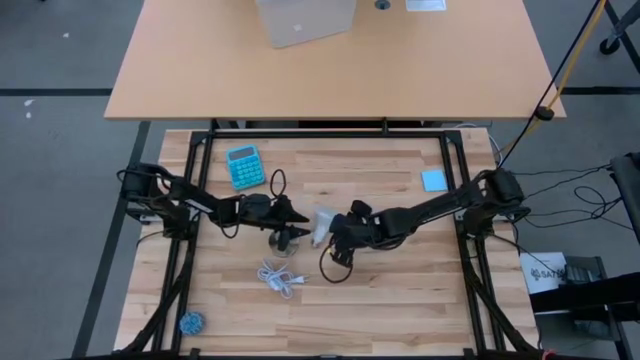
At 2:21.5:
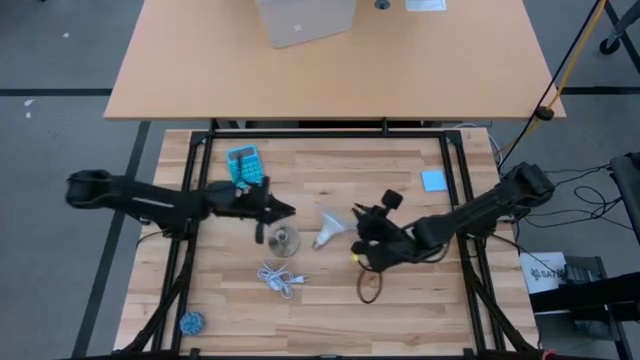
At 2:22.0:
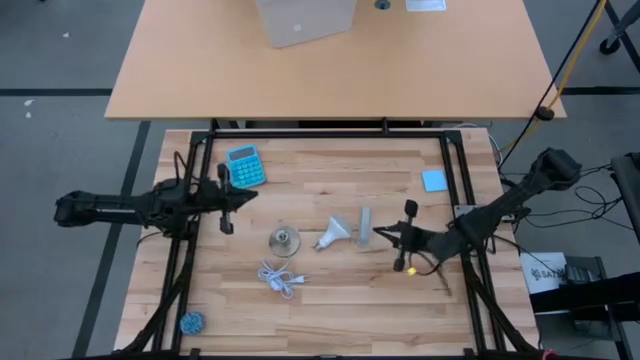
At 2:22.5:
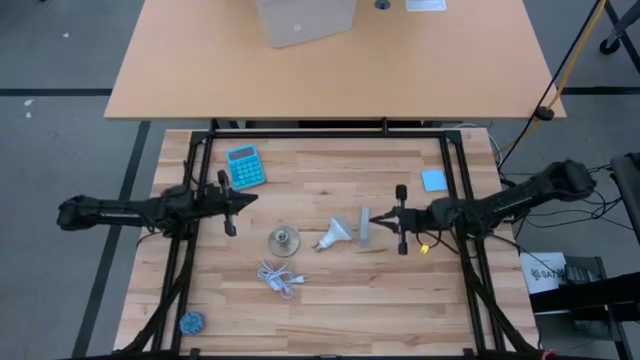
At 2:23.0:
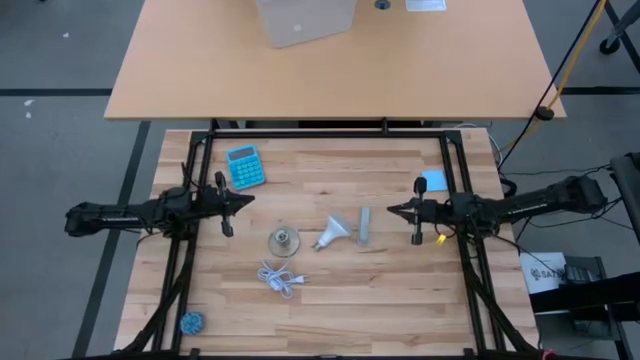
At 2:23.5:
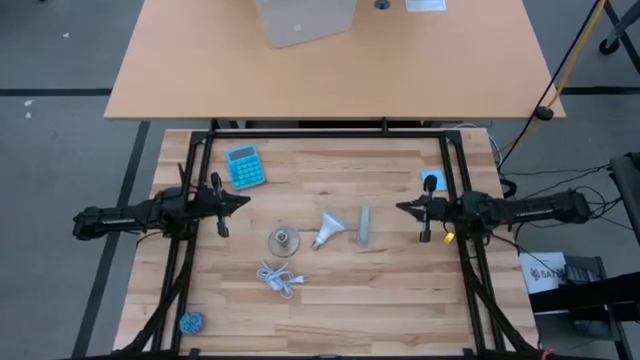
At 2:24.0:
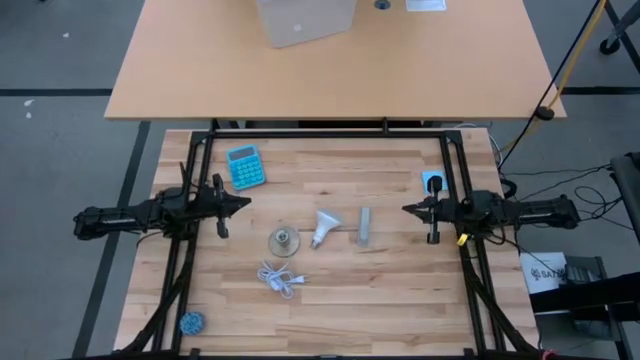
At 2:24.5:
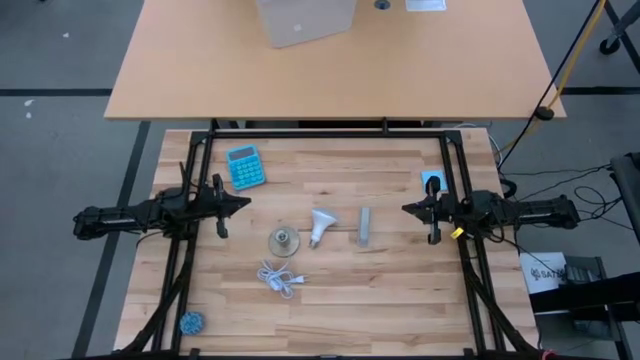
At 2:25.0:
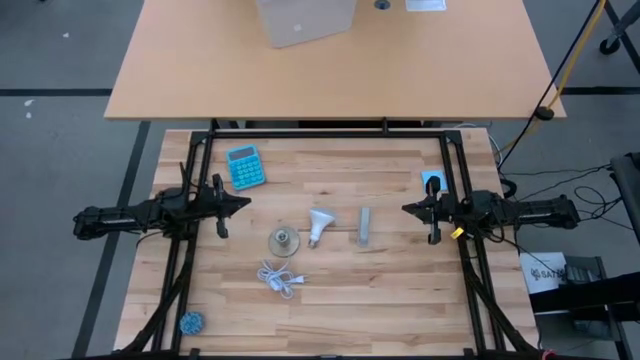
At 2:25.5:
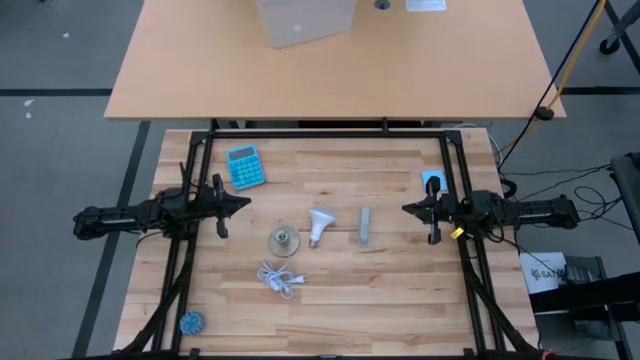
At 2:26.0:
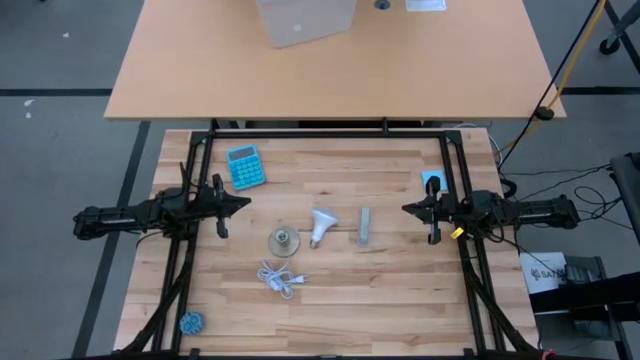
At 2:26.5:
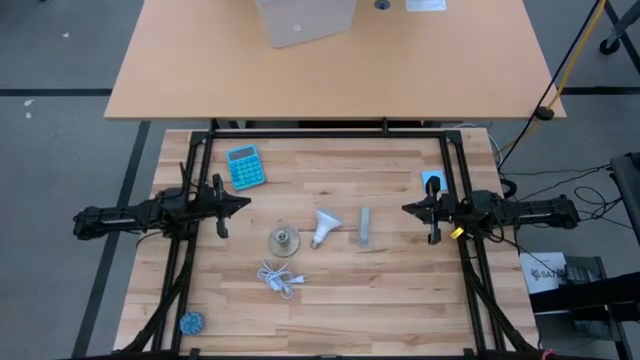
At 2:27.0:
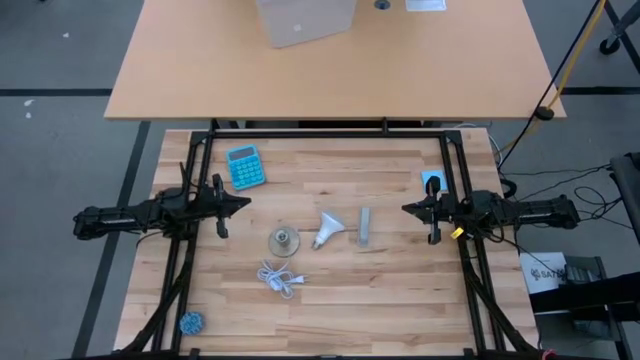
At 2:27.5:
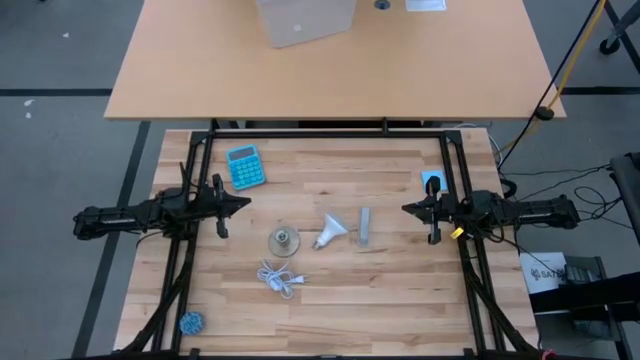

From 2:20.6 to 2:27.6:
Task: Screw lightbulb
Return to Home Position

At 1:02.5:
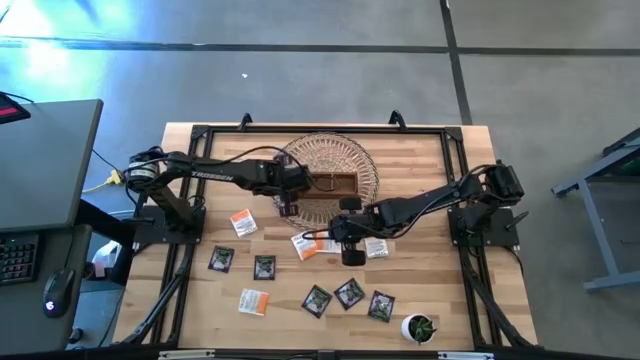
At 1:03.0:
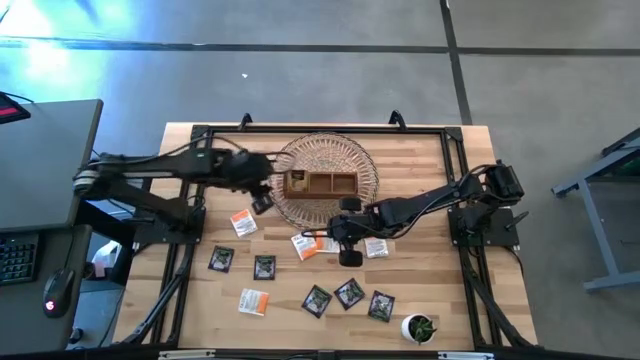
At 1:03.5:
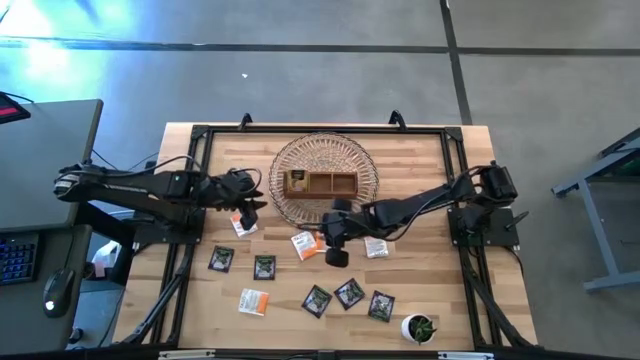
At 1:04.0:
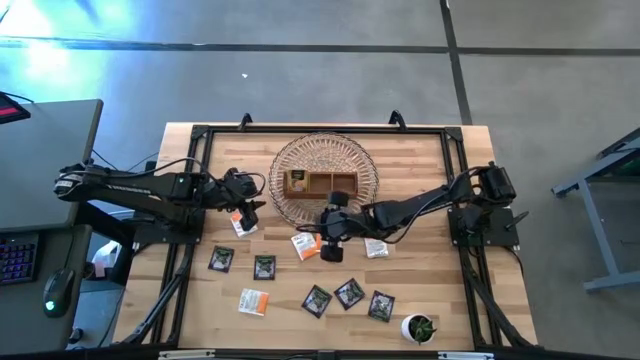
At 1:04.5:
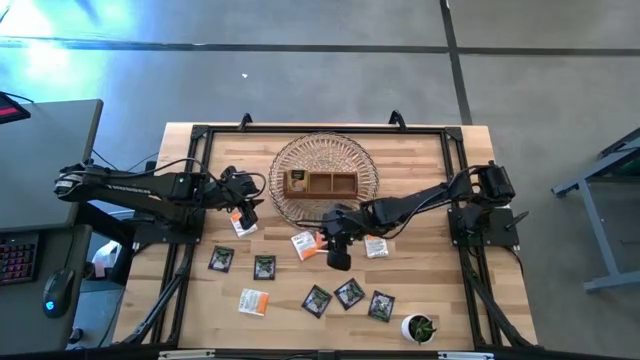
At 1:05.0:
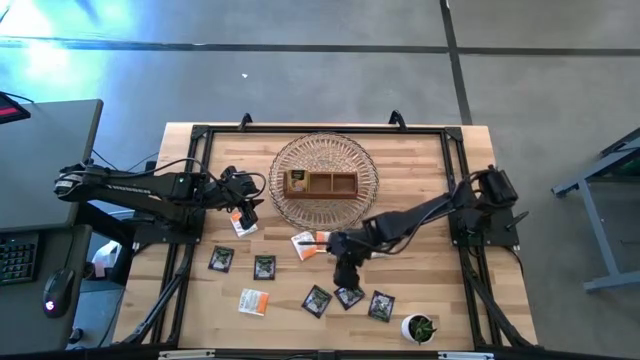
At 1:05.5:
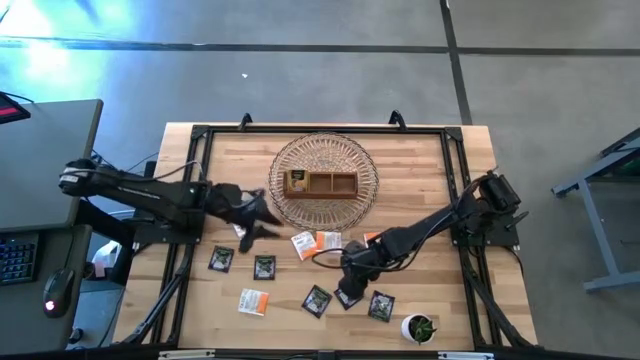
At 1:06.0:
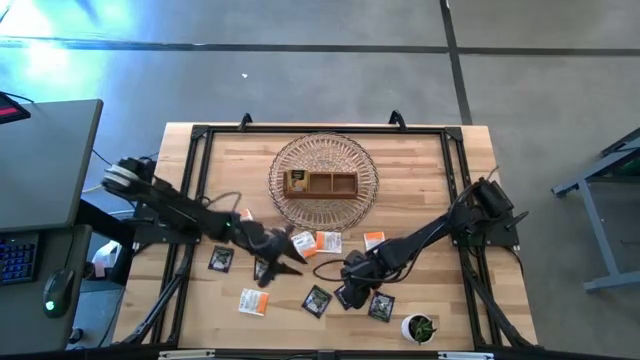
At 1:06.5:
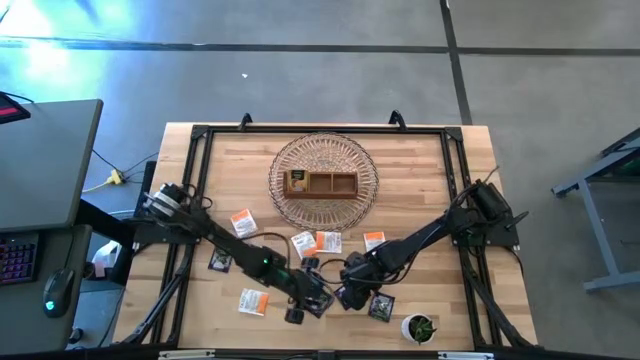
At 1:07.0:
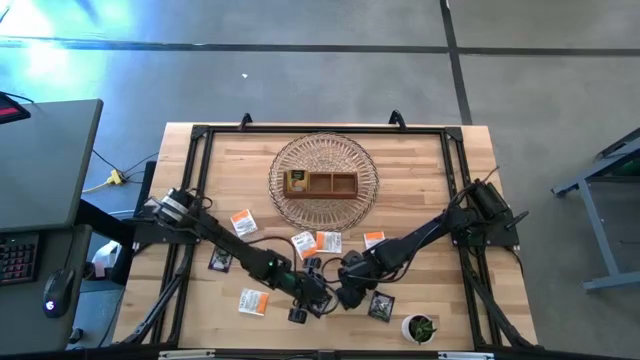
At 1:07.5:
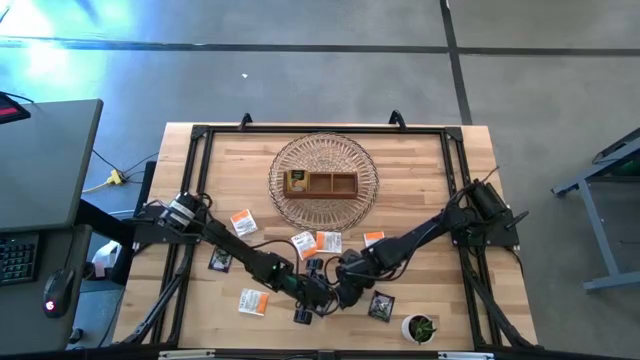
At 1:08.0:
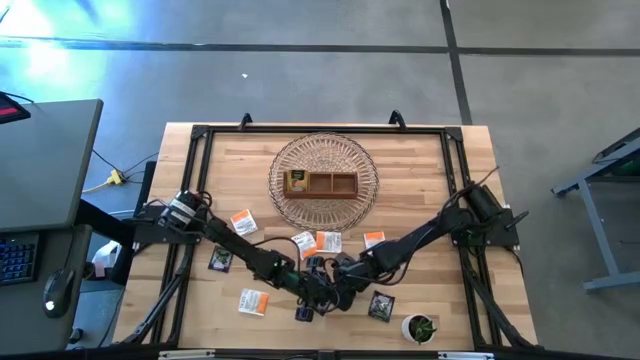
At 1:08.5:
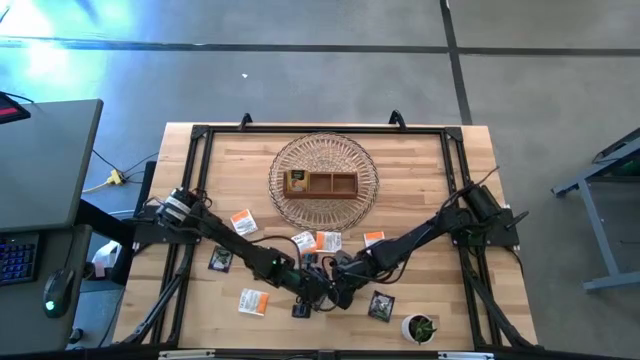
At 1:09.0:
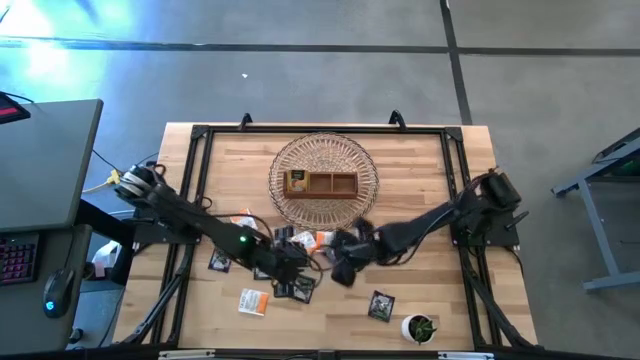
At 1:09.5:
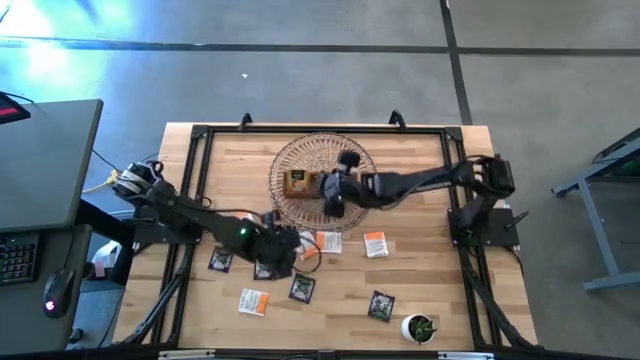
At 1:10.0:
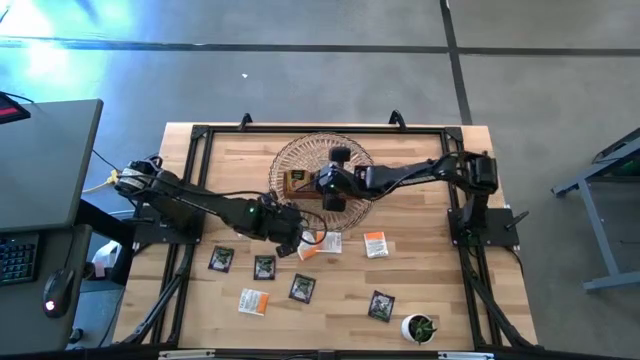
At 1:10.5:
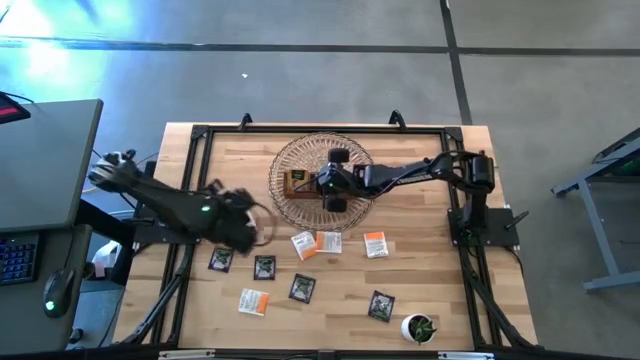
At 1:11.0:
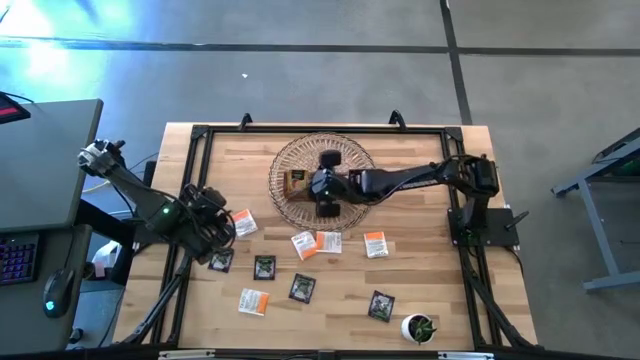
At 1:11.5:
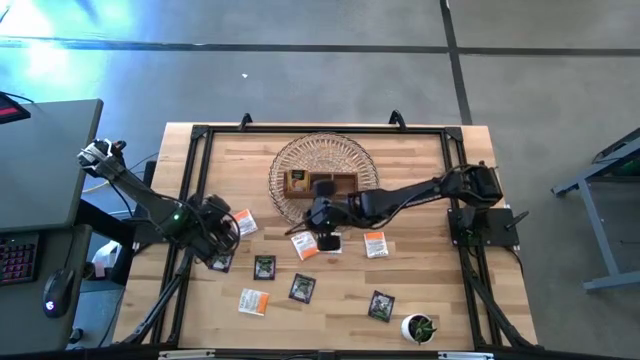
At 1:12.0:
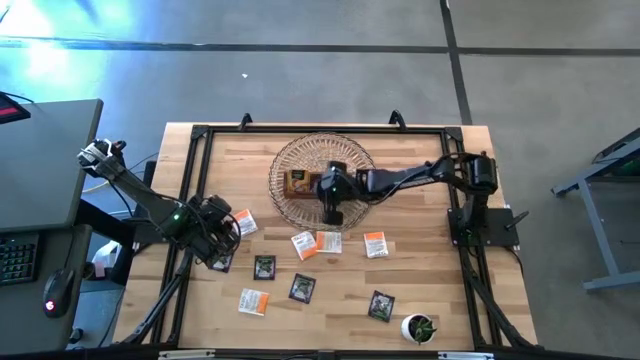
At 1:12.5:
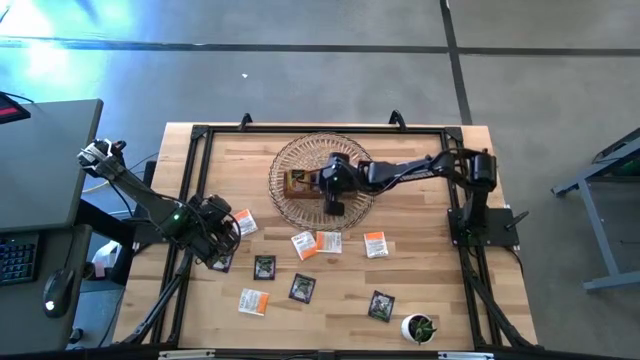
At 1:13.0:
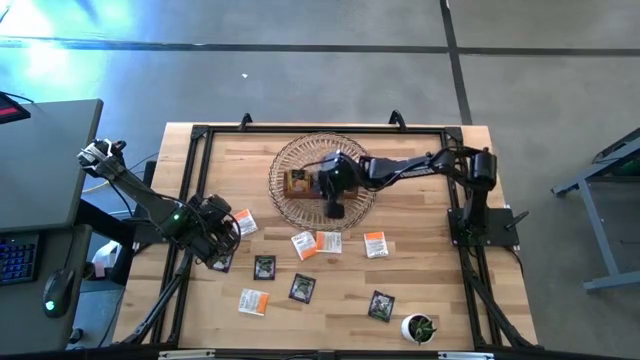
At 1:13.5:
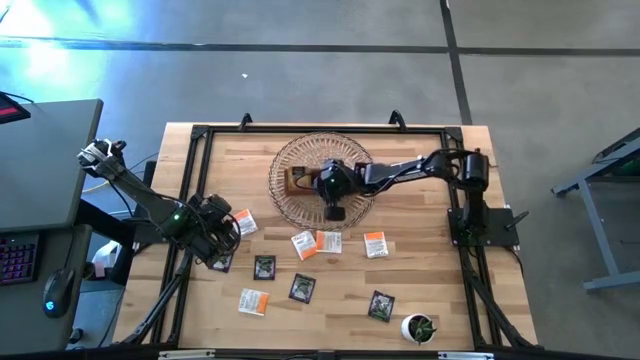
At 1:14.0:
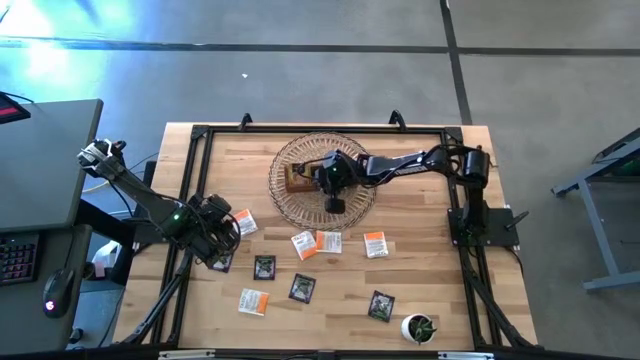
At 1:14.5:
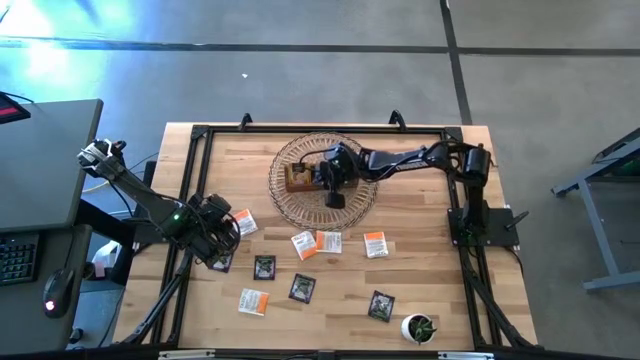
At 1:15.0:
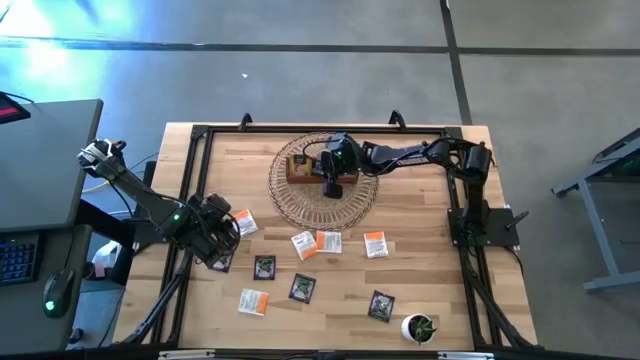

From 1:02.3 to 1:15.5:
Task: Pick & Place Tea
Put the black tea bag into the middle section of the wooden organizer
